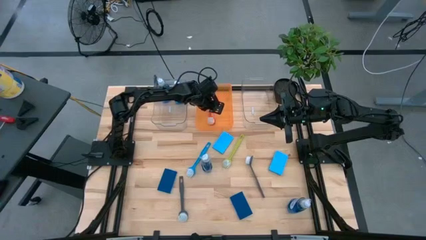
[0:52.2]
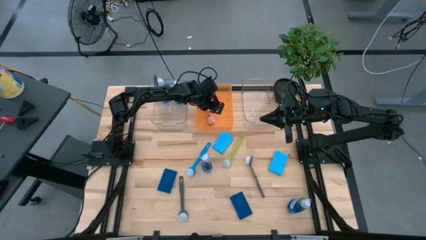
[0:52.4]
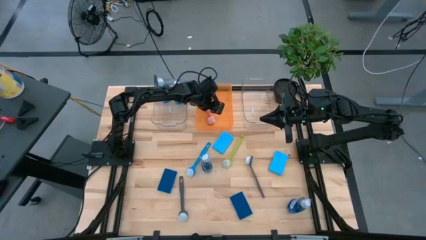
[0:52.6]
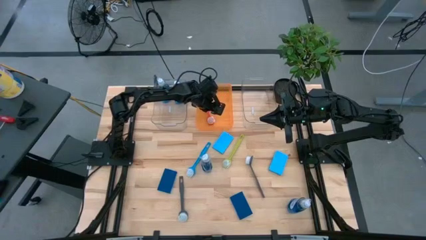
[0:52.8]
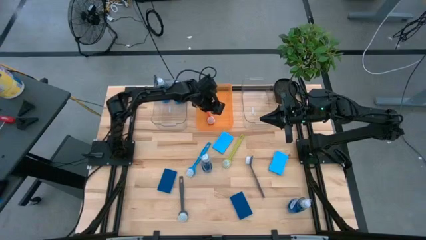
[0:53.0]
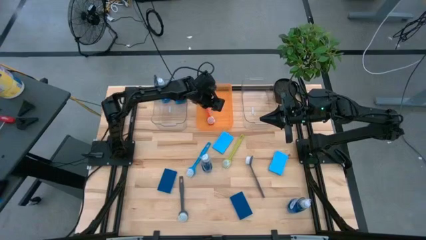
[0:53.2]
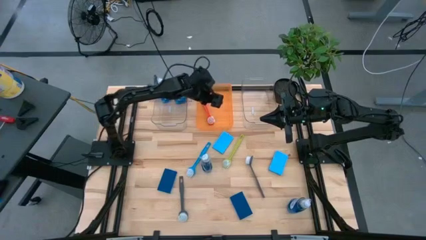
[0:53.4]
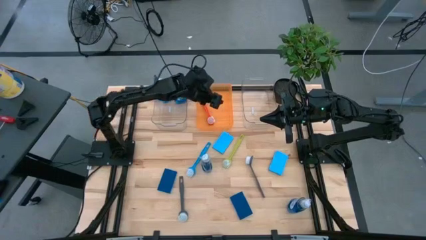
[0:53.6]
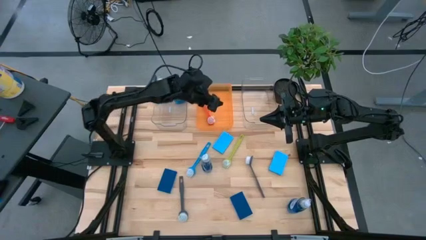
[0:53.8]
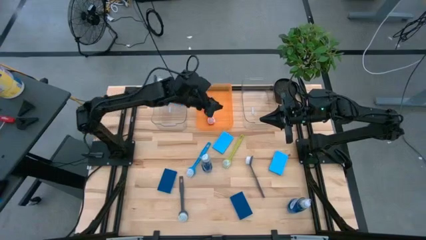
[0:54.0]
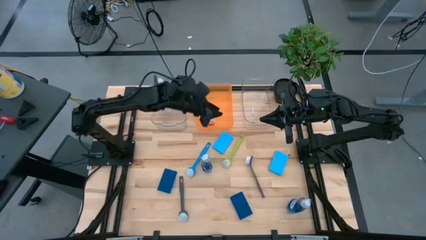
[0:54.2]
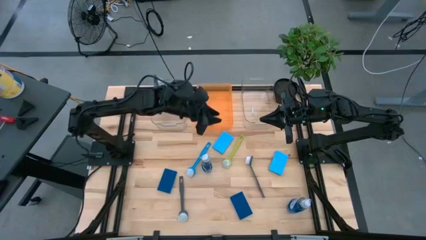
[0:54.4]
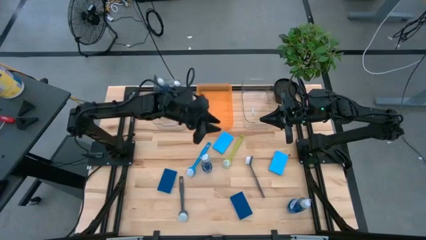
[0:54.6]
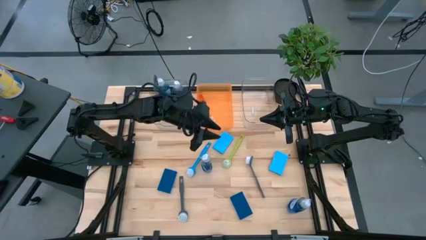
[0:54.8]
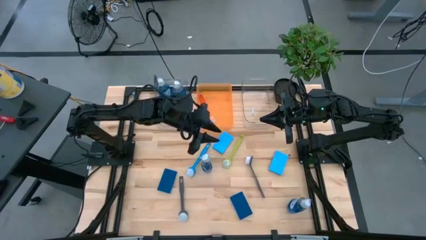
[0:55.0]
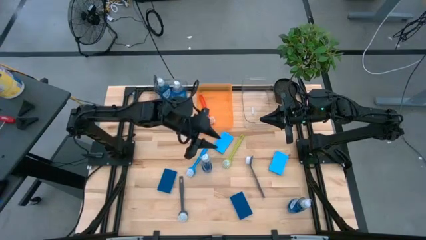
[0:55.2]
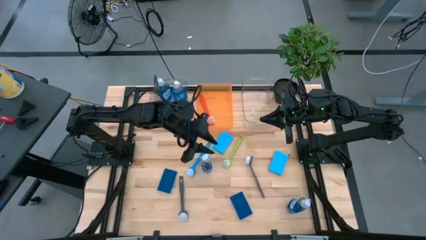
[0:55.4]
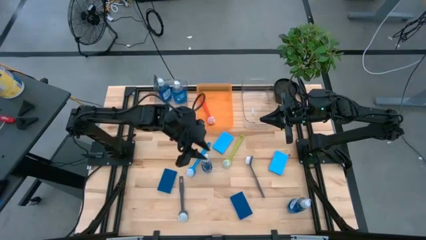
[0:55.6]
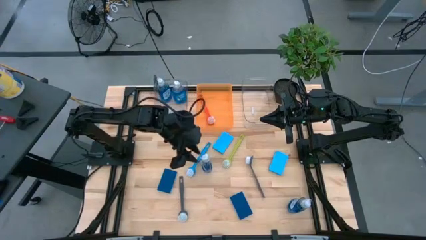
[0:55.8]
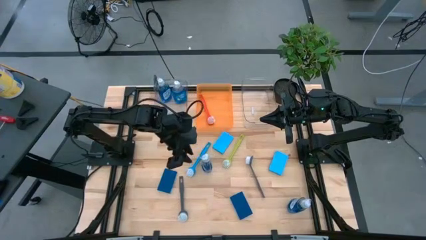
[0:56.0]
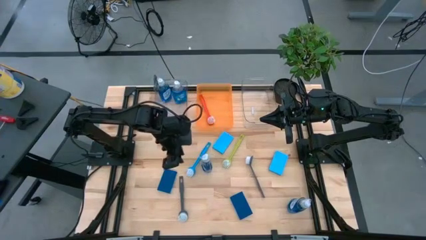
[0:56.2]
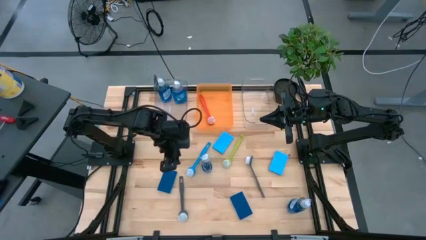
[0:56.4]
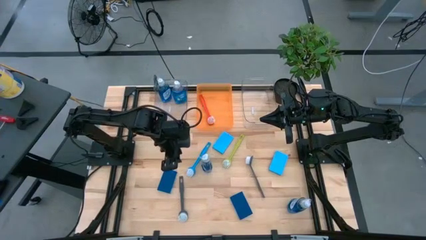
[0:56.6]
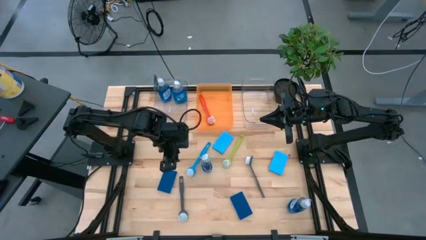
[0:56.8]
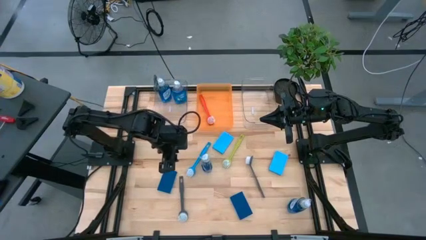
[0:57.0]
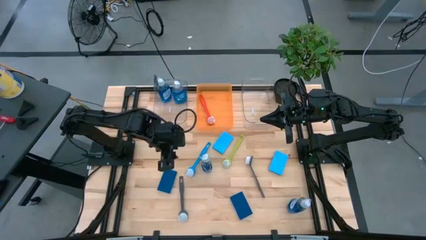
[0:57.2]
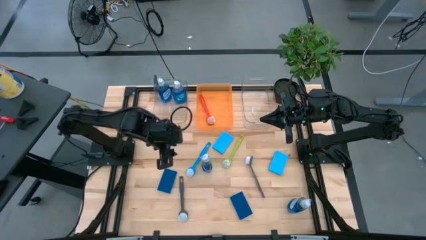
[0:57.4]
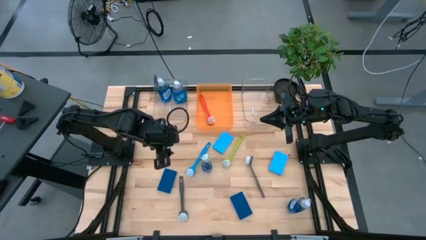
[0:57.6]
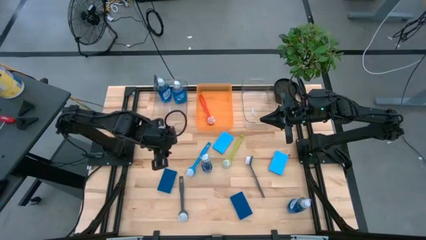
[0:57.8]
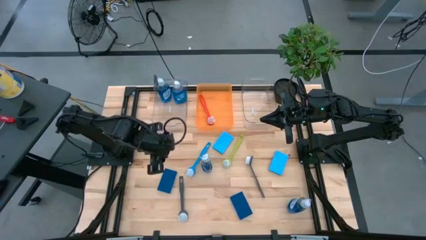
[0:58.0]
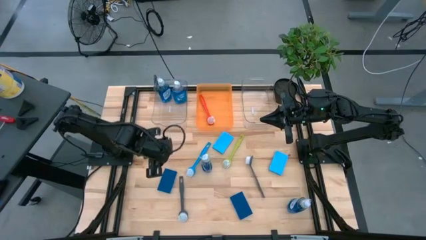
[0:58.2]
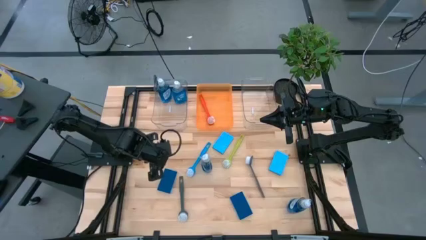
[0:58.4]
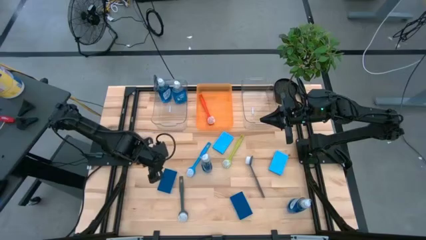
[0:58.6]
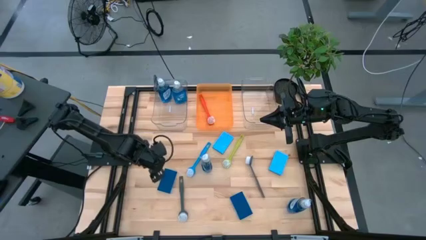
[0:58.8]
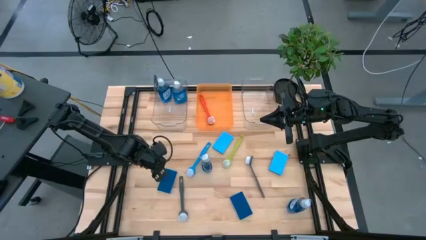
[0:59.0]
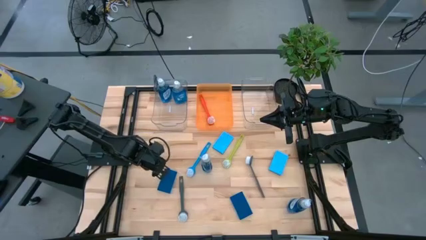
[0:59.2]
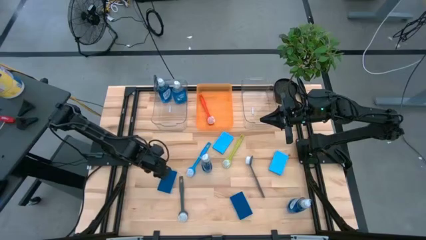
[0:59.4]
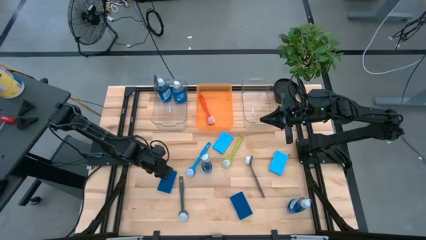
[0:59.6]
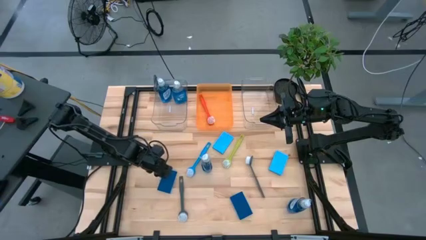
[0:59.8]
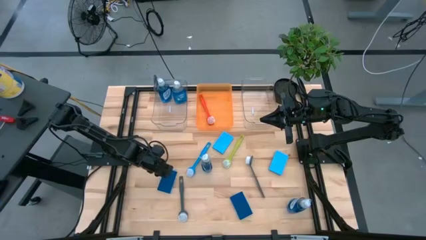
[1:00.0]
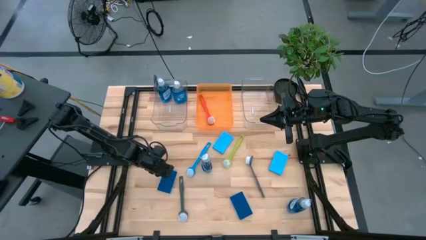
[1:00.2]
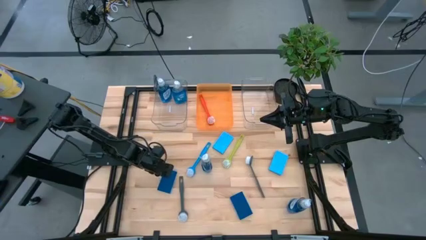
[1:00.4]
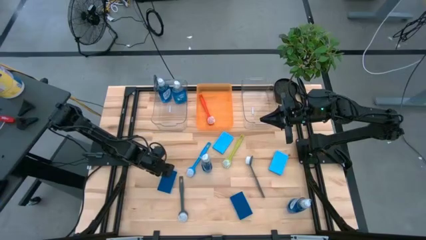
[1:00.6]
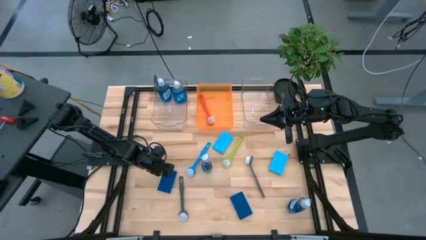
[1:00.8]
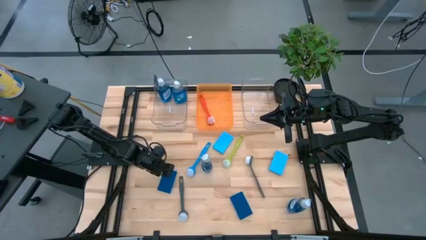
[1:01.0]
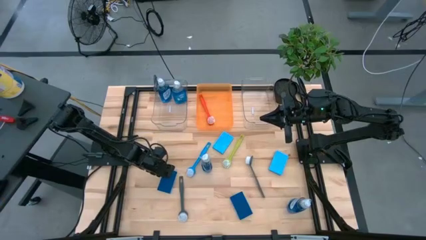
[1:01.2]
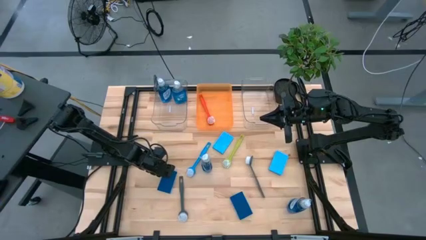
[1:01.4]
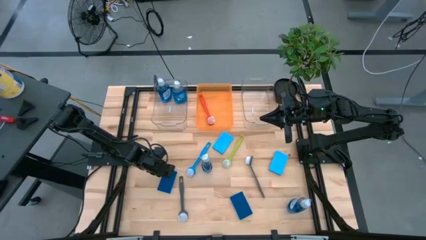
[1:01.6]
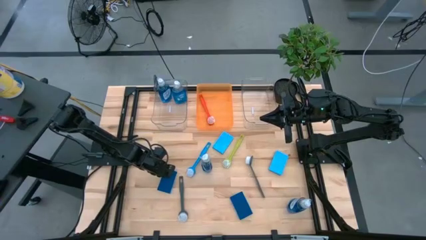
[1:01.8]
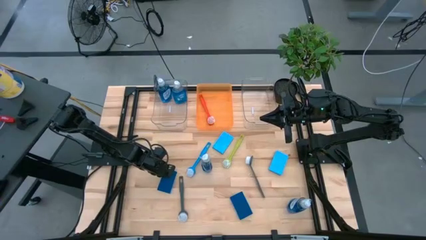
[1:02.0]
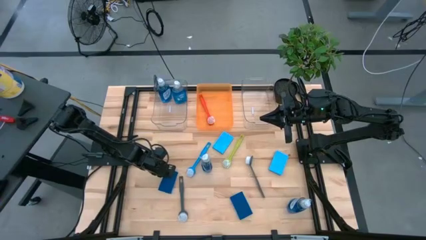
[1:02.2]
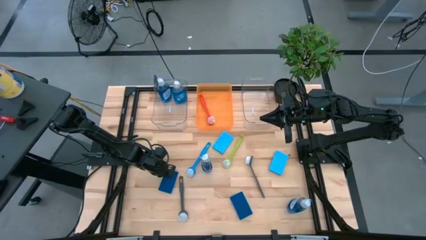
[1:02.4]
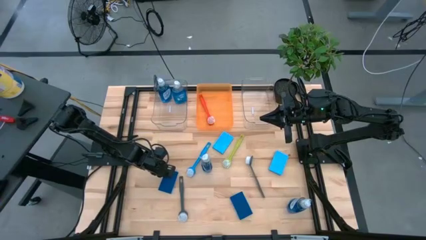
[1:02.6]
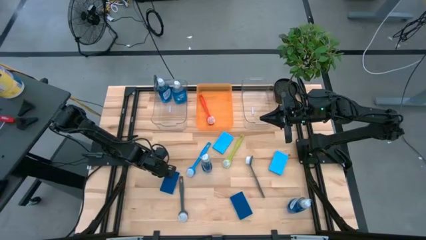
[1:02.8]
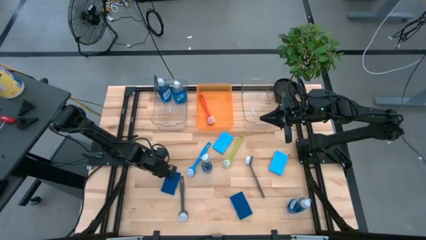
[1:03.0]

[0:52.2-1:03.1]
Task: Pick & Place Kitchen Sink Supplies
Put the blue sponge into the right transparent bin
